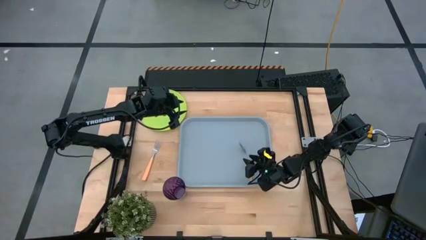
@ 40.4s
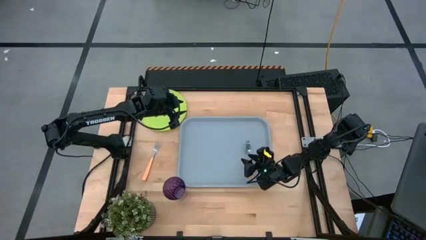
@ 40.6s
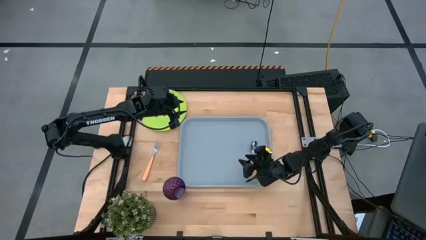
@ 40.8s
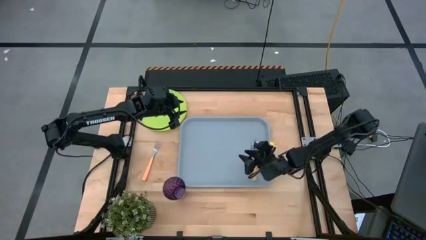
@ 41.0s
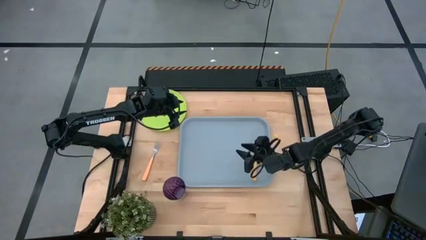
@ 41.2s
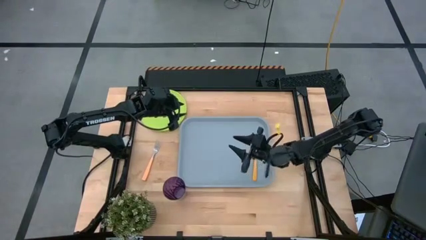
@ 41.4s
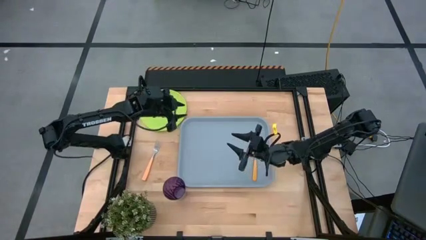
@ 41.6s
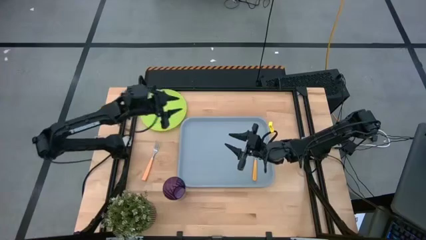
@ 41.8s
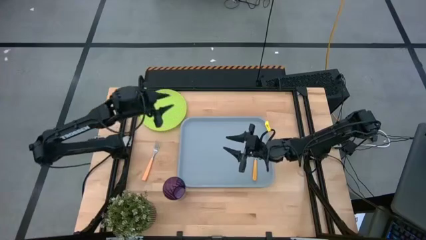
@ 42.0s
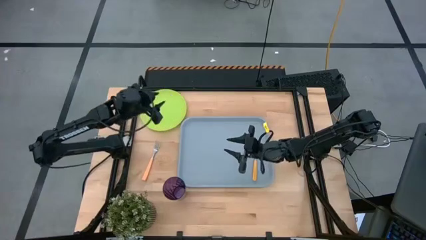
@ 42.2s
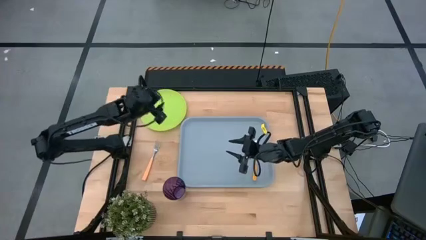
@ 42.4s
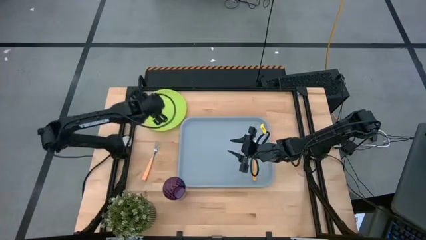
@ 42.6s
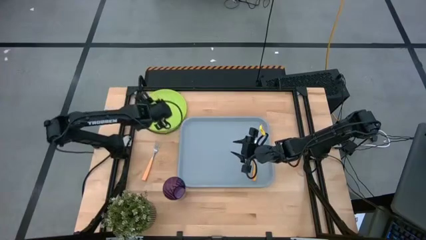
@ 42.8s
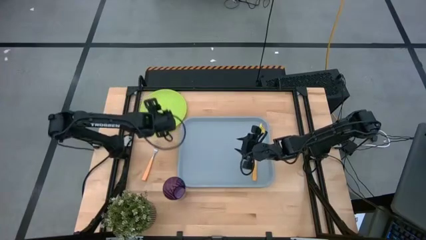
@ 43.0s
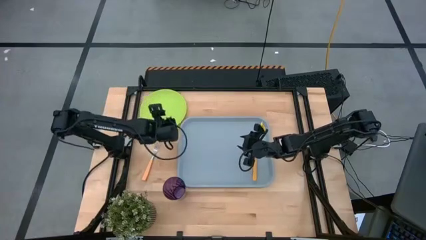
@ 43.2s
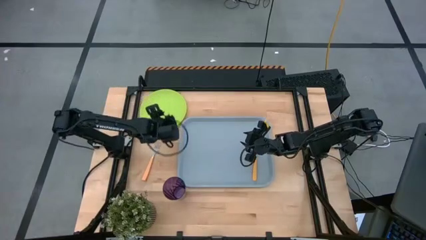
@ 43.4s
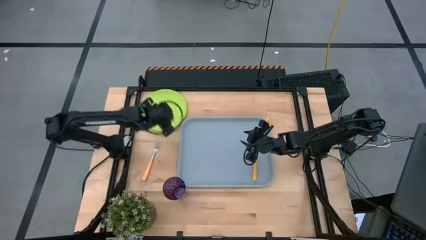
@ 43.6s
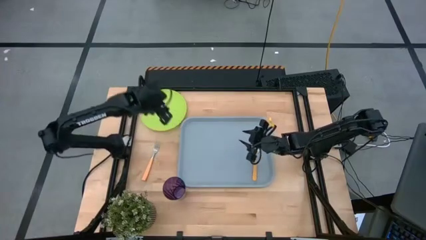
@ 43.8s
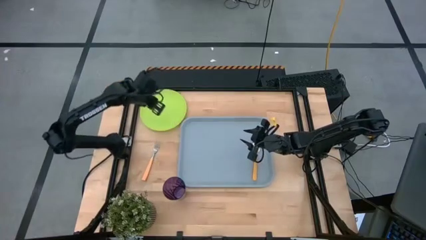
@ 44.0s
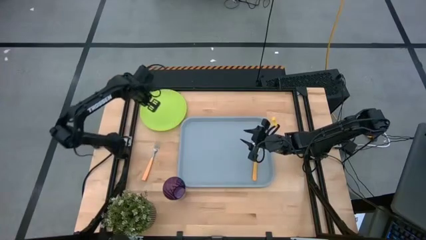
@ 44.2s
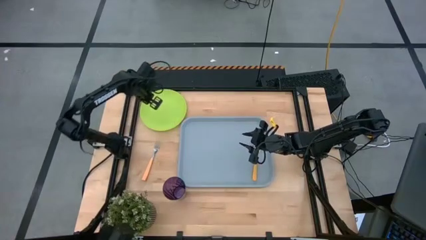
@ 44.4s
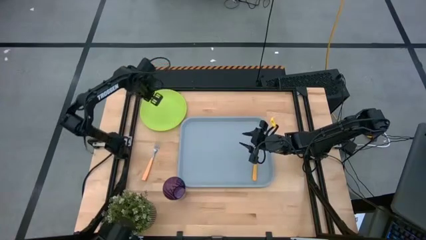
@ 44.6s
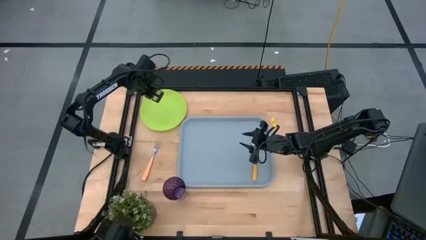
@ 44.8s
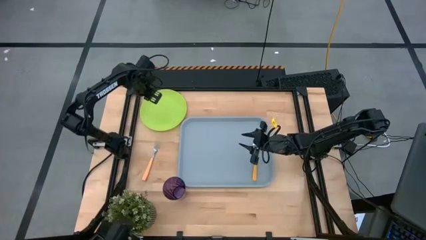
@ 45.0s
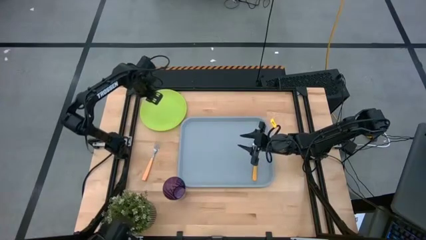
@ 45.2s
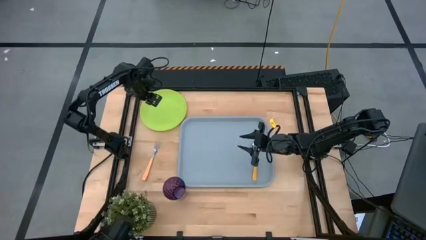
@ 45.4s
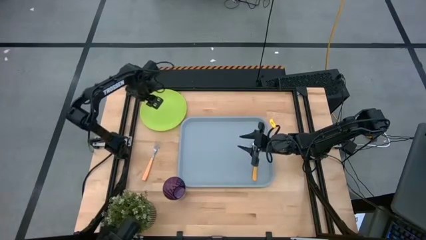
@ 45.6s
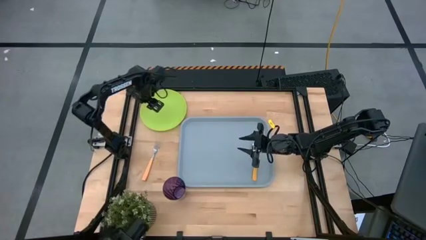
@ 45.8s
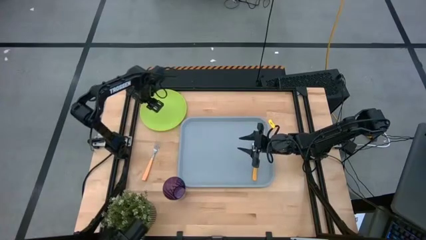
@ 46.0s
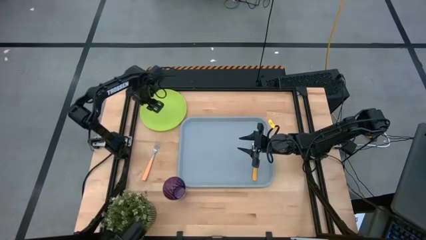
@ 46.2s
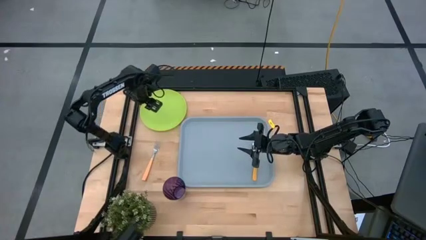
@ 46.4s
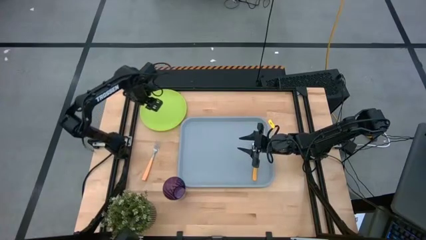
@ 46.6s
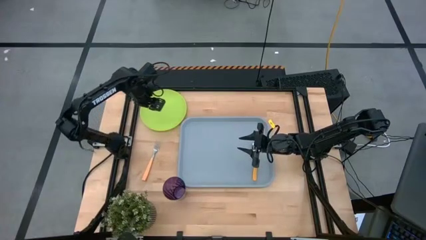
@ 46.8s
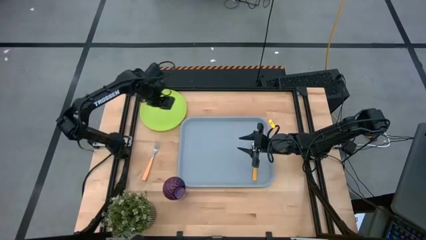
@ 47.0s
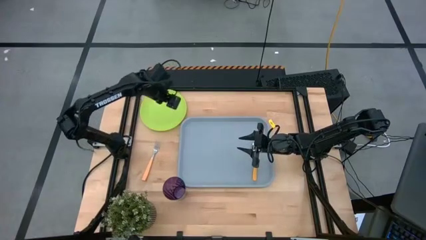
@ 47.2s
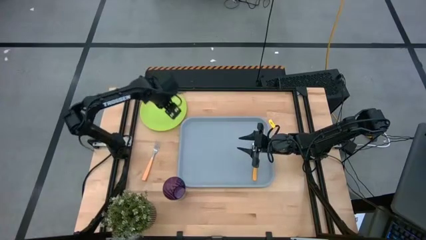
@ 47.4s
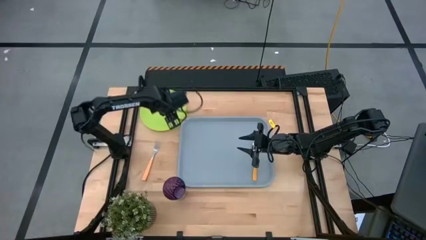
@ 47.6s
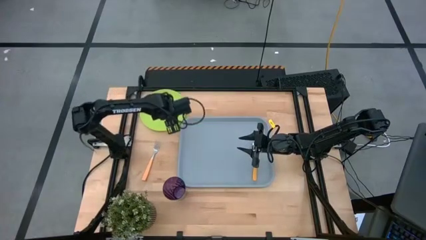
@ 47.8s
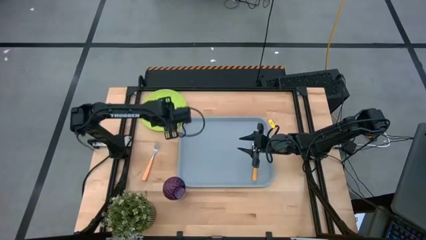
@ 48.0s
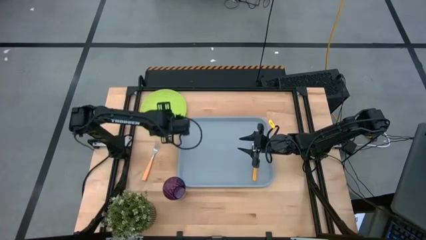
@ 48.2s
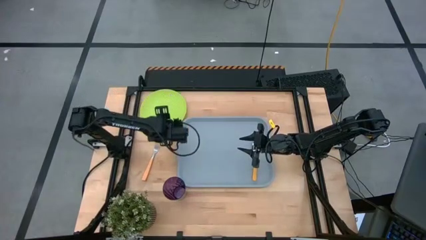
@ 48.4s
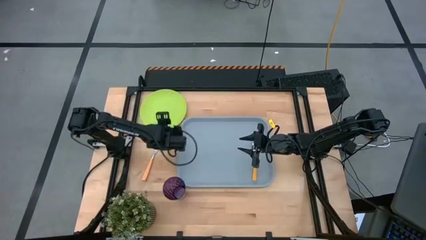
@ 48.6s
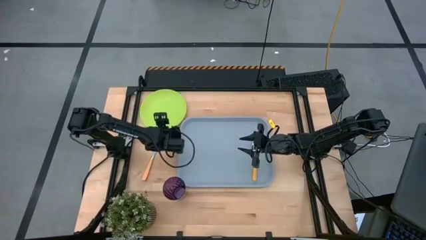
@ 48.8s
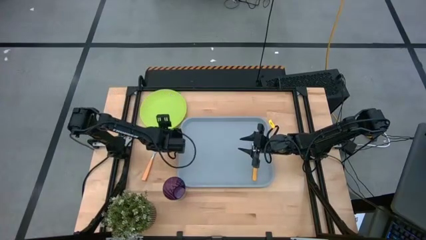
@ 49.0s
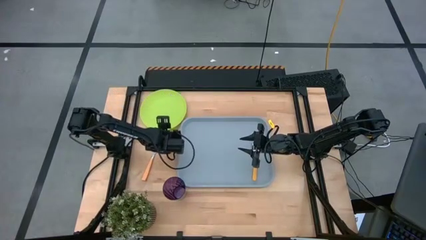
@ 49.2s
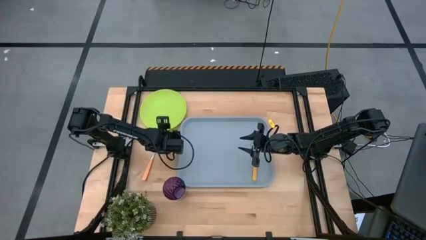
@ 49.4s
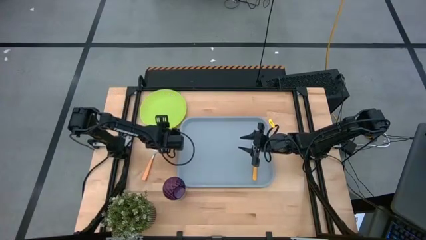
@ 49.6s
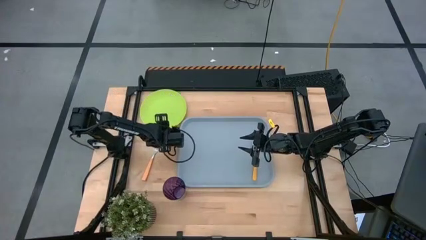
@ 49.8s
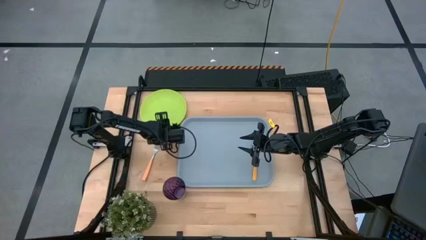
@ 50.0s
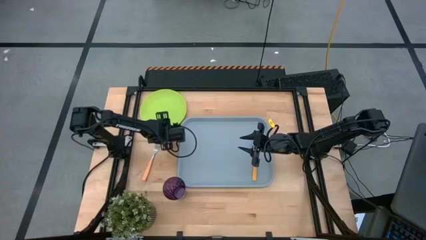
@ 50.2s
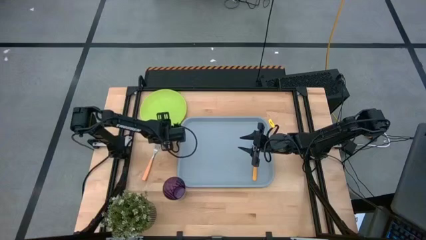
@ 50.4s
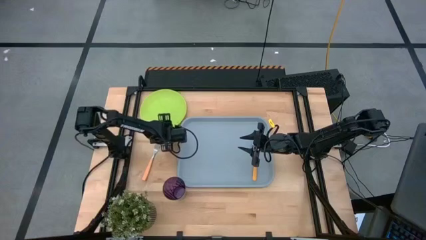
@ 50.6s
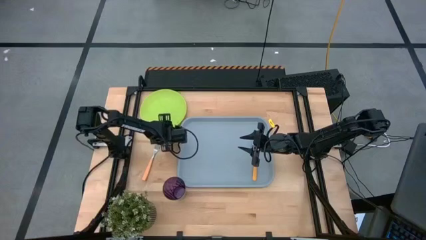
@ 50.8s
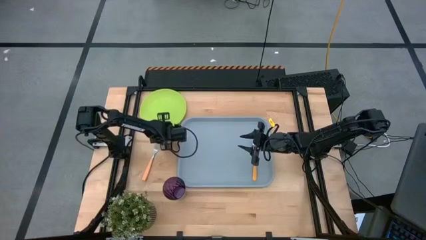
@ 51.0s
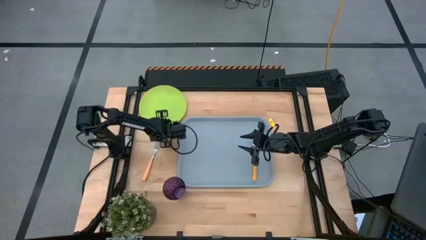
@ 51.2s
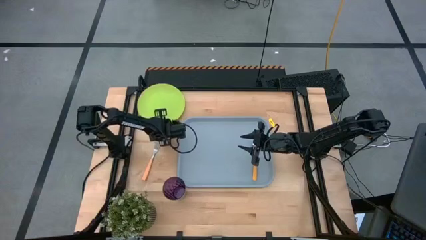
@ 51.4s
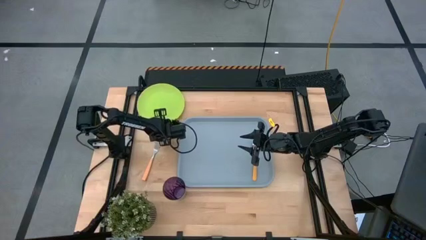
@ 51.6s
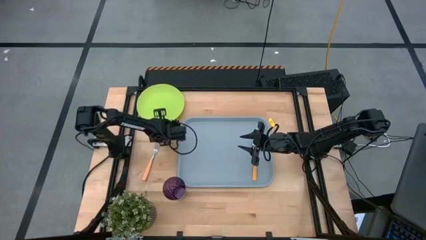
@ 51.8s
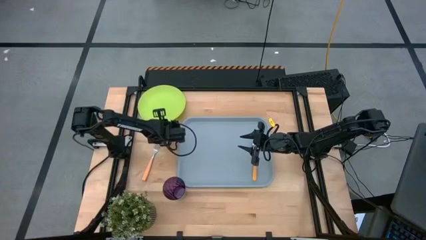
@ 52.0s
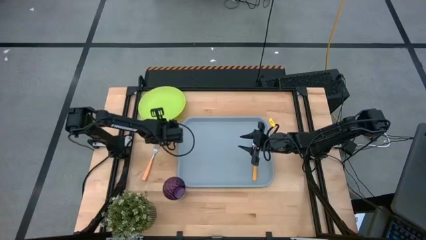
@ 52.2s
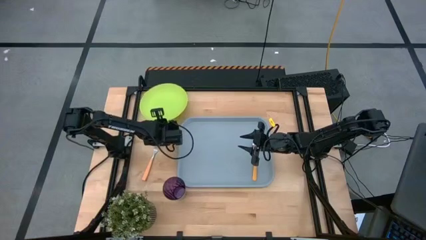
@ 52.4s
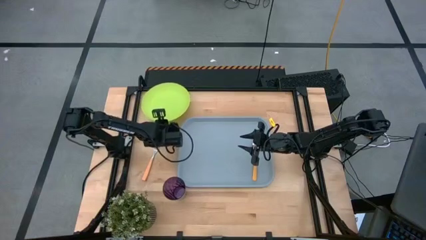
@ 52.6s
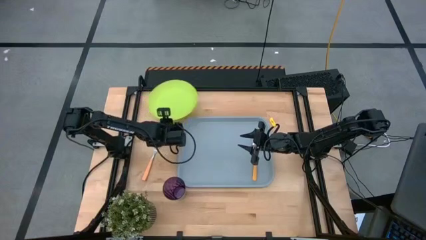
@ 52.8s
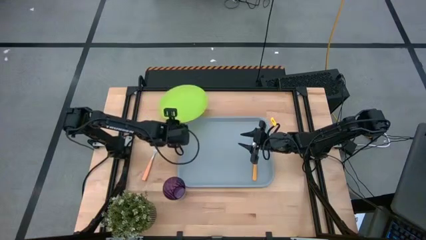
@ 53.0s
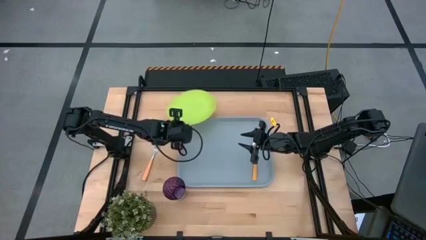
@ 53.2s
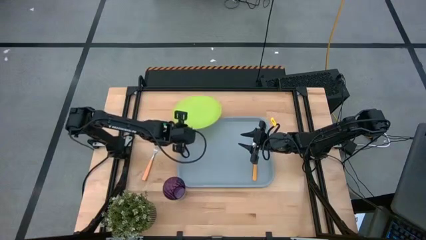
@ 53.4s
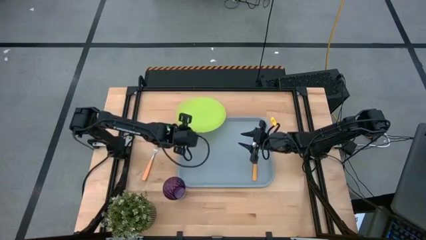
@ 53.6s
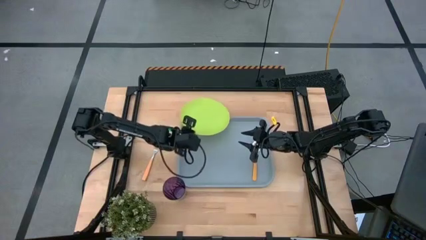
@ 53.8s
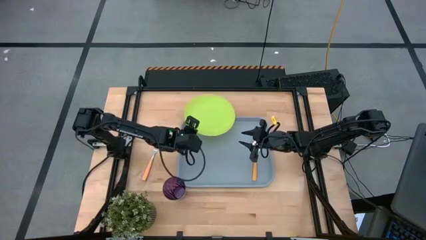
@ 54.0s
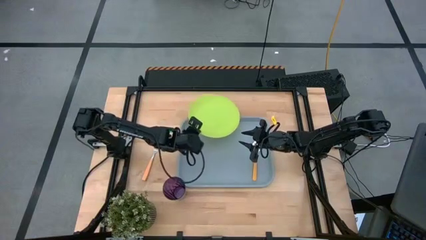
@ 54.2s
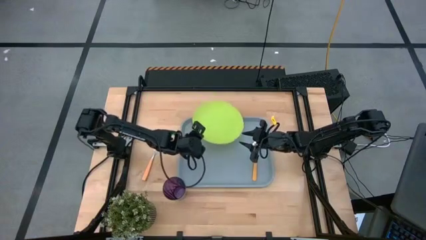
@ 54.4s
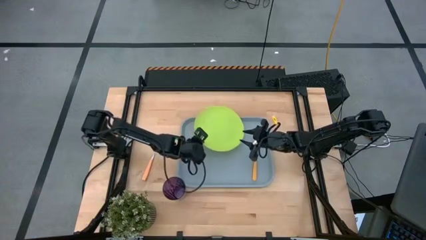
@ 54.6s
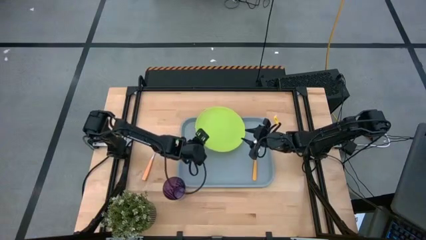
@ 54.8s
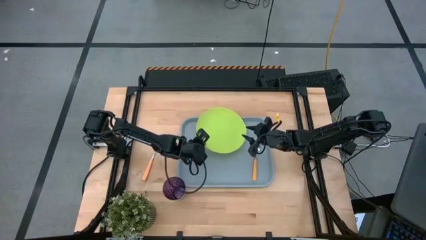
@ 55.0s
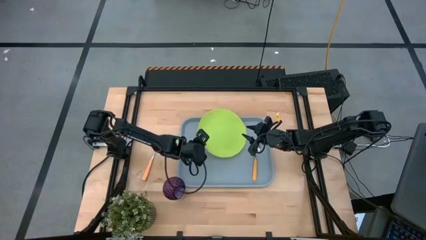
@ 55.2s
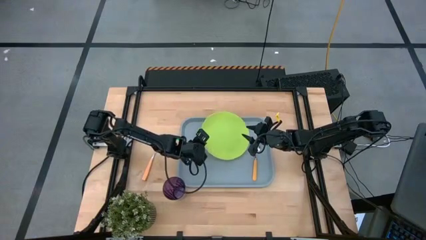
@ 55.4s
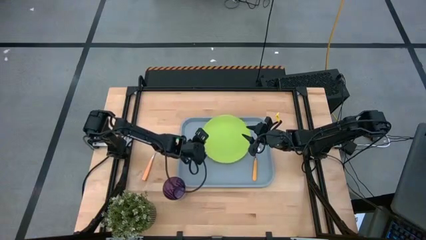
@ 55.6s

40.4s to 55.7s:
Task: Pick and place plate/cup/fork/spoon on tray
Put the green plate on the gray serving tray to the left side of the orange spoon

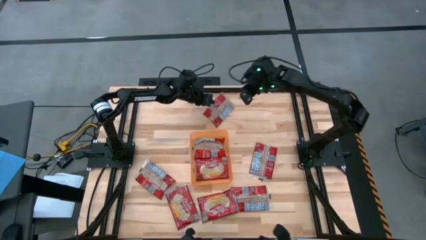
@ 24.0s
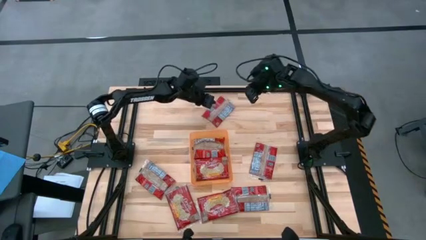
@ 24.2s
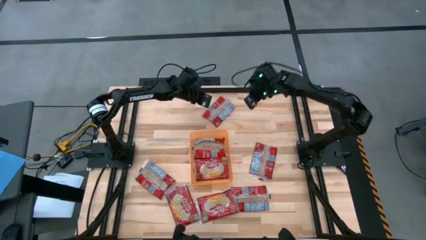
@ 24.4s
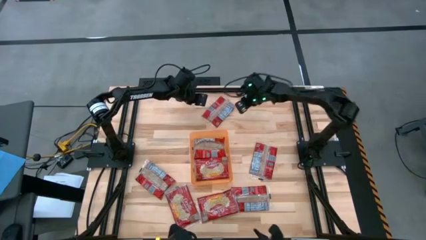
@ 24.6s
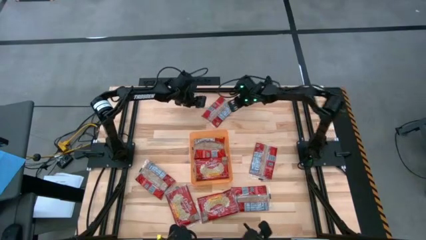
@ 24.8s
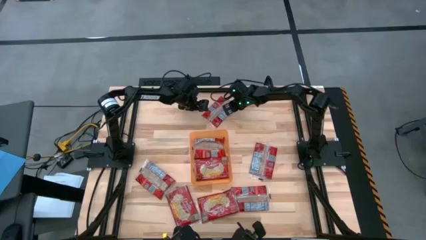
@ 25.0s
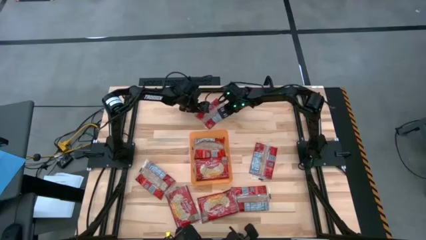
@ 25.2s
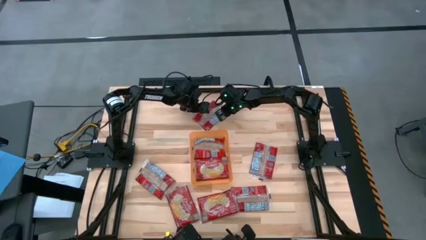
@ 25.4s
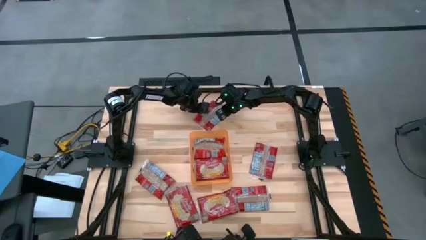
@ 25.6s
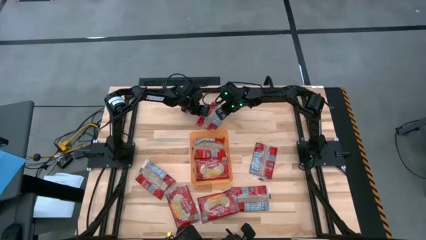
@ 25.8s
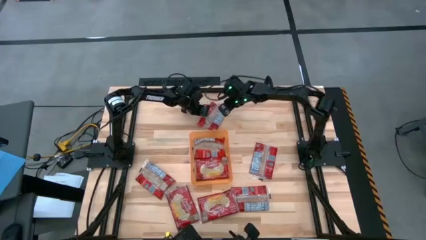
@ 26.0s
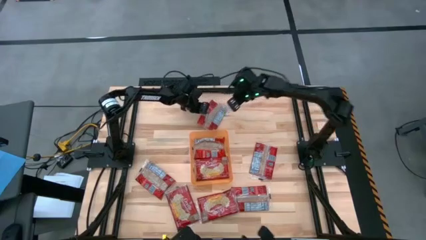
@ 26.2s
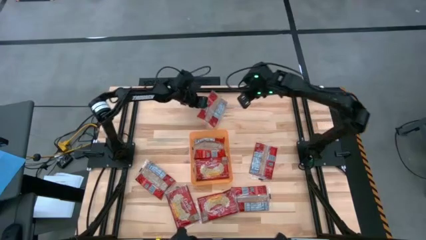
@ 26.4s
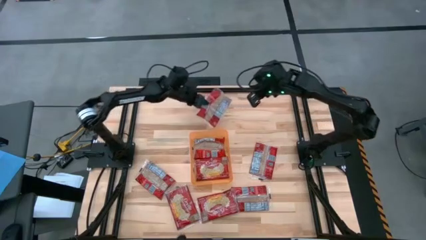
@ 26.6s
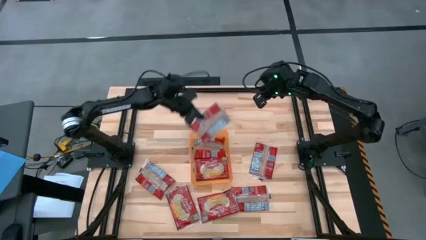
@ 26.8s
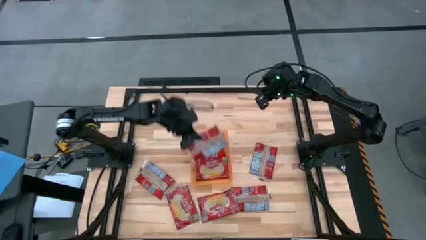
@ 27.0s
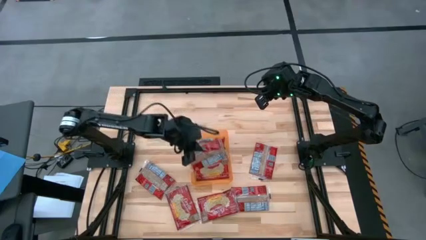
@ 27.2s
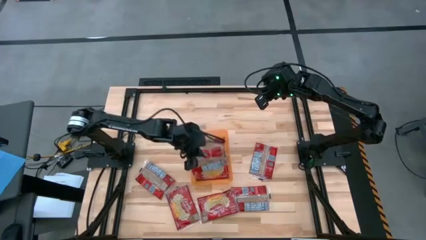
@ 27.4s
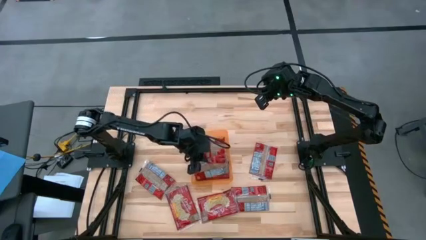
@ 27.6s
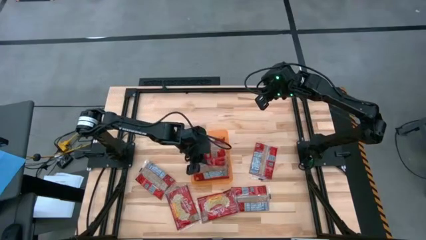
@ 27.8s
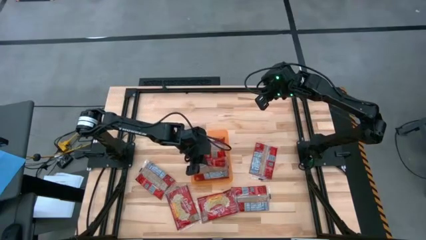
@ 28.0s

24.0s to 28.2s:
Task: Sort popcorn bags into baskets
Put the red popcorn bag into the orange bin
